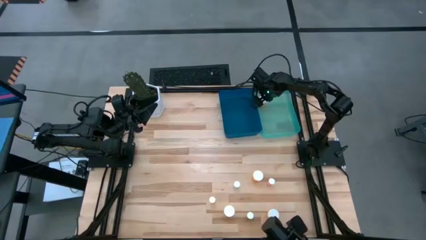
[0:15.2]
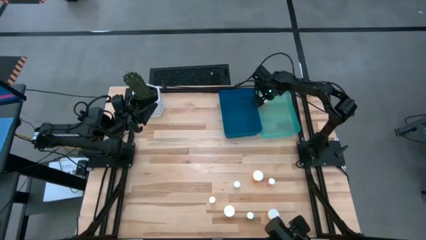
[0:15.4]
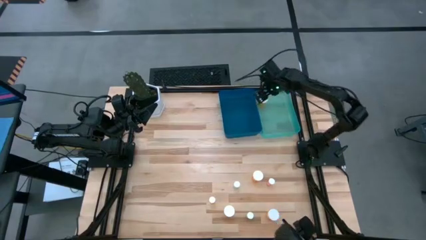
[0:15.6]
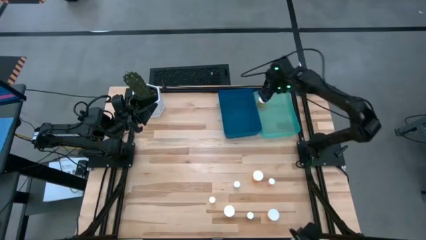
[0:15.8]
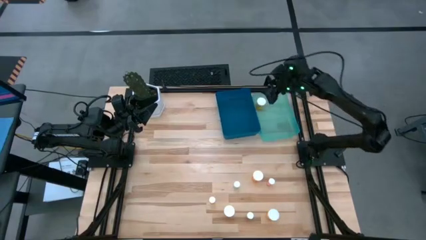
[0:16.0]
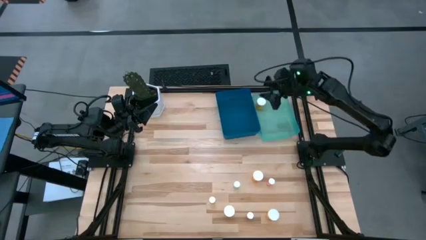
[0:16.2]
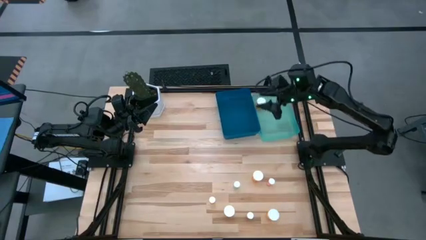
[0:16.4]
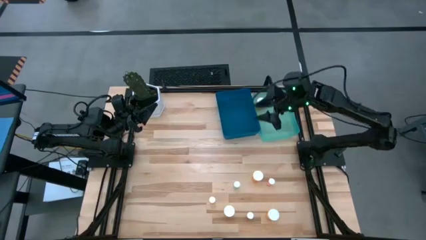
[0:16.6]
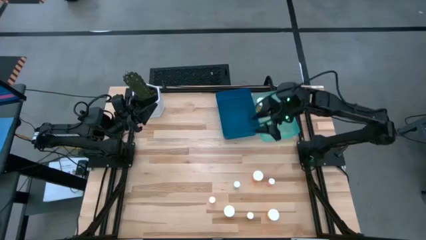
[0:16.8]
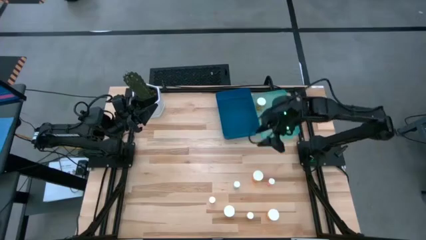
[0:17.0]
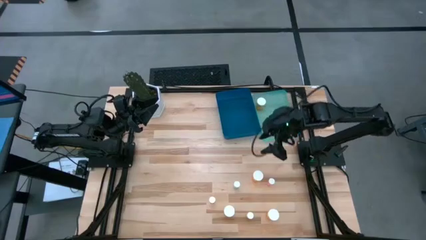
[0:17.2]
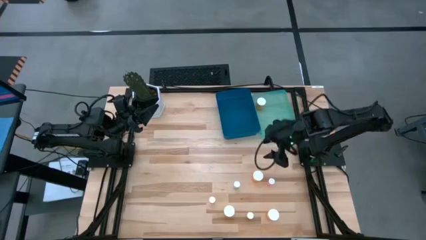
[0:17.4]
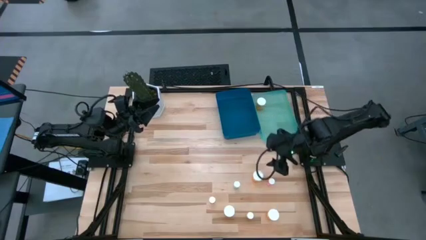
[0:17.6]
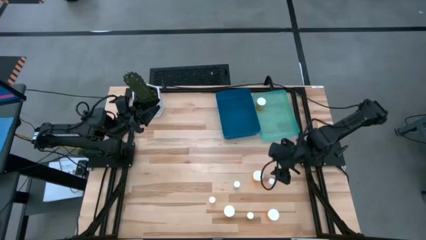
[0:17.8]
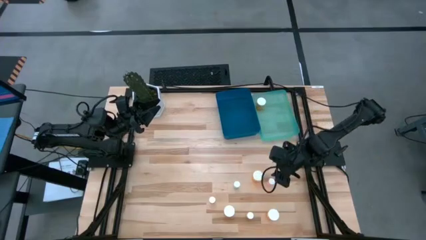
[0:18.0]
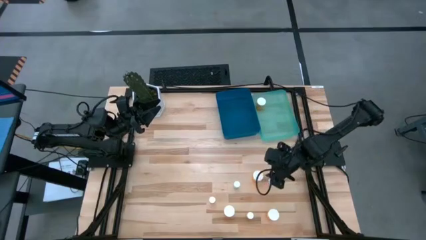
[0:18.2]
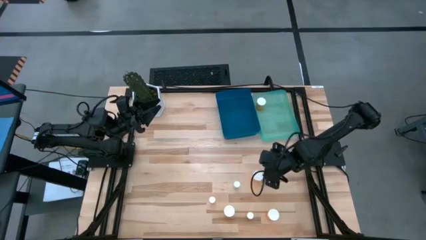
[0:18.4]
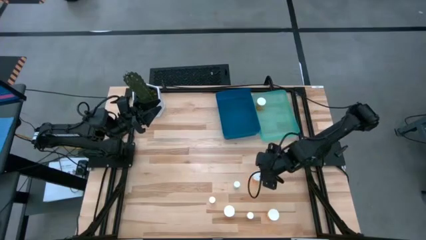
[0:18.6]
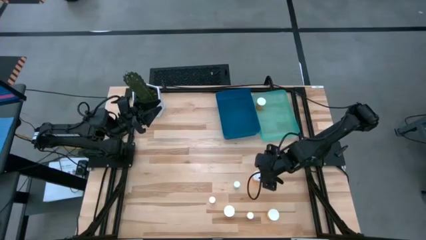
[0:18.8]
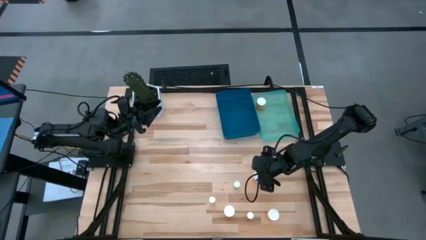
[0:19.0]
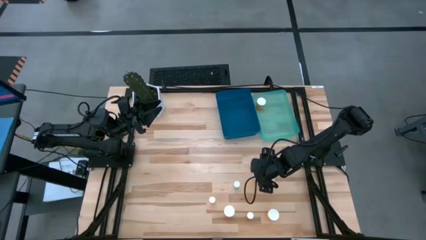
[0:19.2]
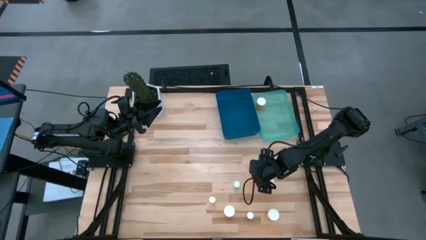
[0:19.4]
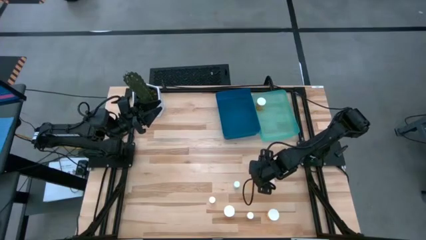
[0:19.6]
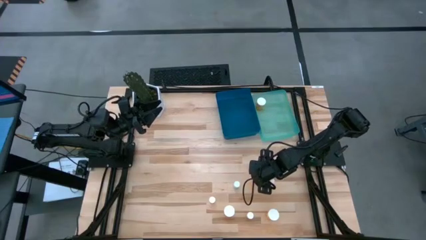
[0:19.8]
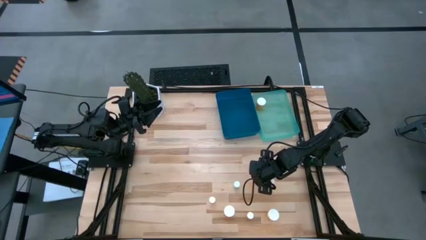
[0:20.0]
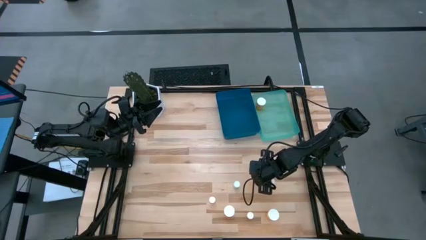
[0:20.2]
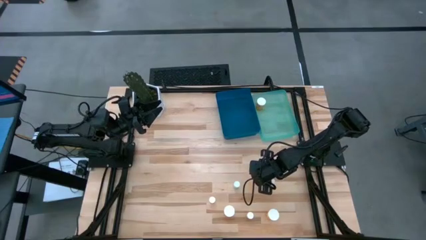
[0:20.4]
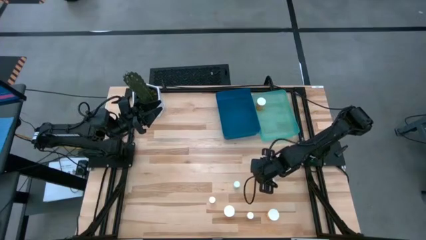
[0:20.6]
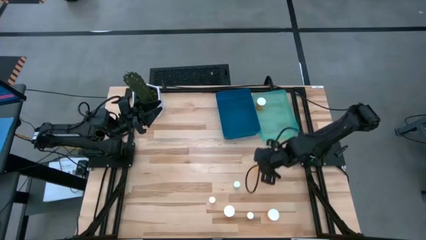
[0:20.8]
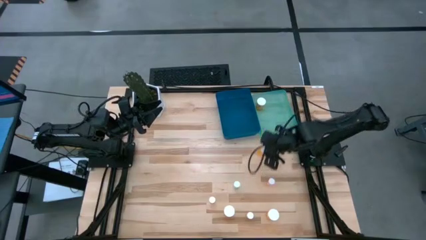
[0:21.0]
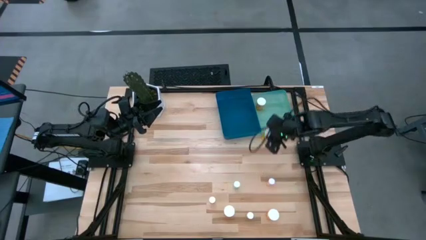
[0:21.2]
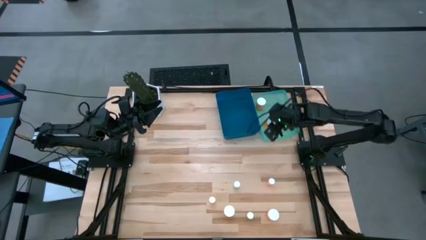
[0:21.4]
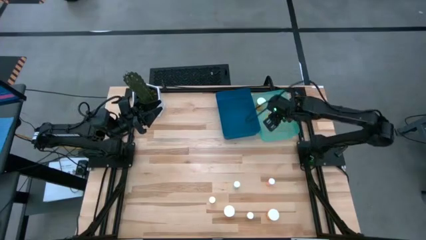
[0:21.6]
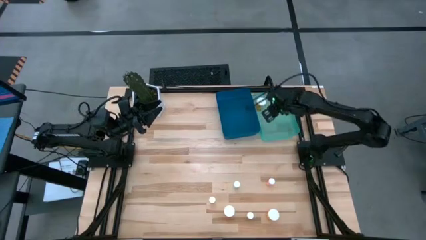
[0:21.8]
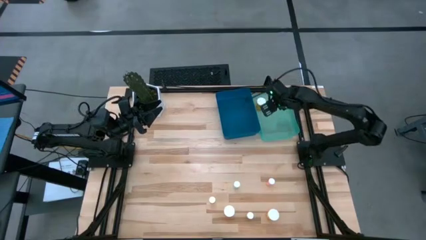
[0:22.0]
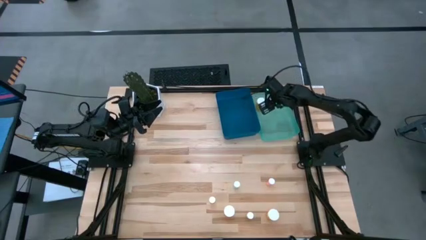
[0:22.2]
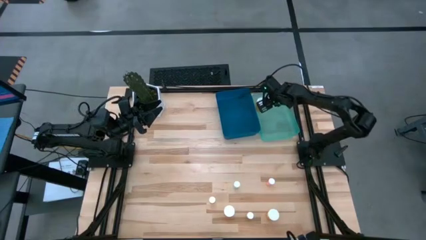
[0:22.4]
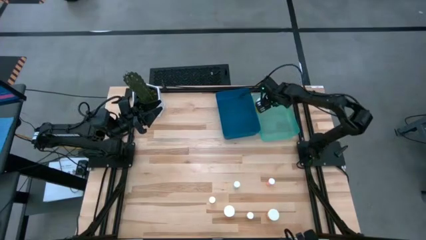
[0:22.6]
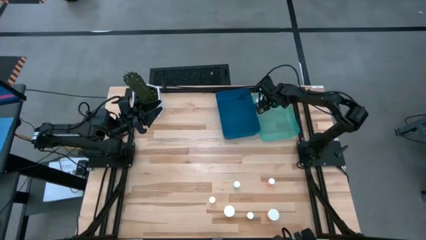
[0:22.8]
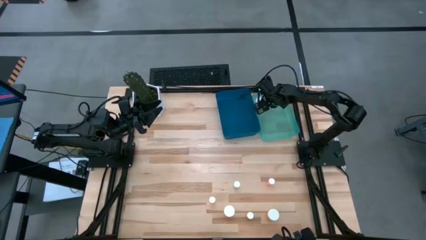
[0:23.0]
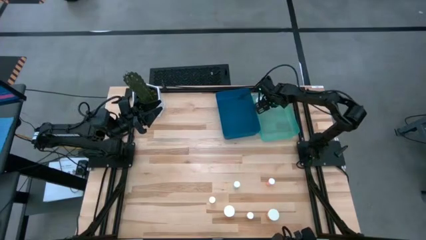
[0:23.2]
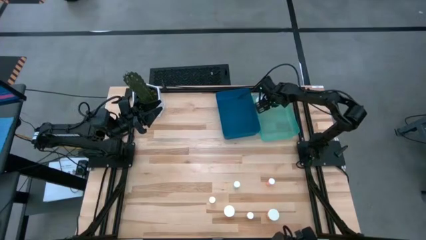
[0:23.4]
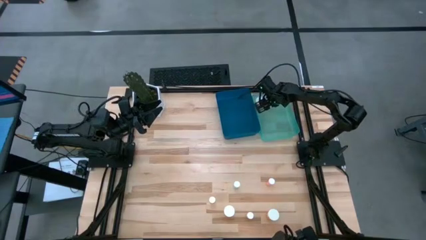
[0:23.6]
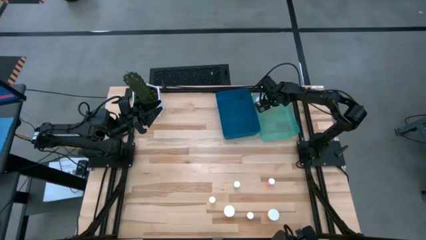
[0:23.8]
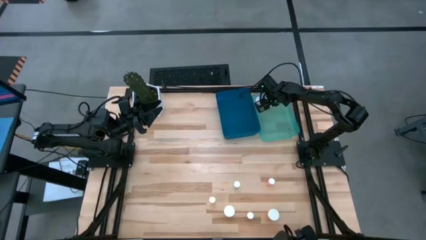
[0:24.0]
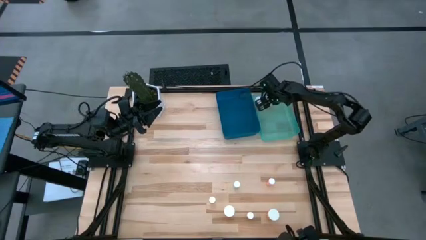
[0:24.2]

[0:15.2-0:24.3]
Task: Pick and place medicine bottles into bin by pill shape (circle, oval)
Put the orange capsule bottle into the light blue bin

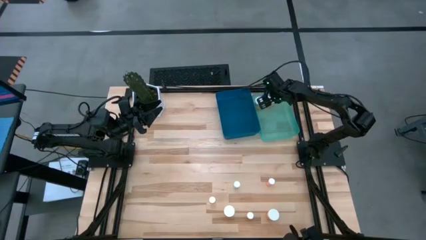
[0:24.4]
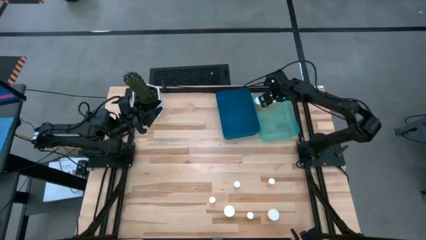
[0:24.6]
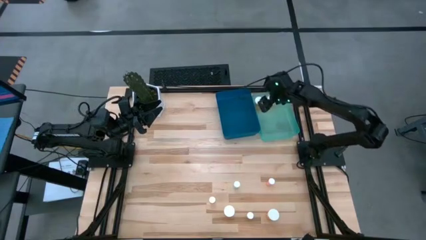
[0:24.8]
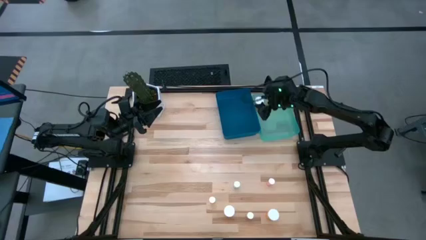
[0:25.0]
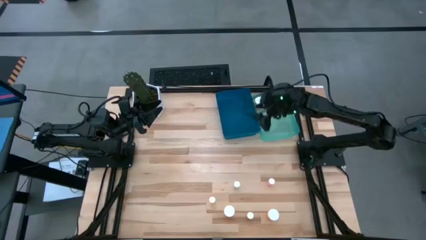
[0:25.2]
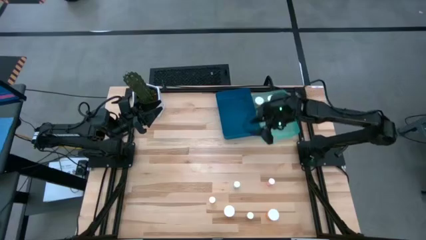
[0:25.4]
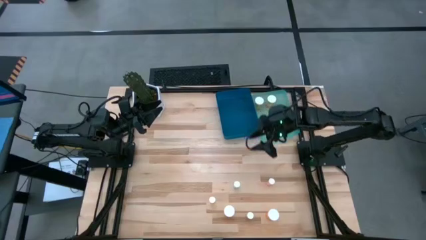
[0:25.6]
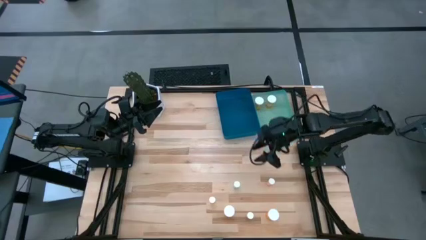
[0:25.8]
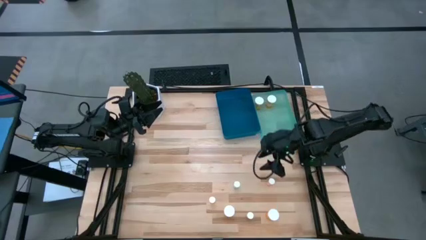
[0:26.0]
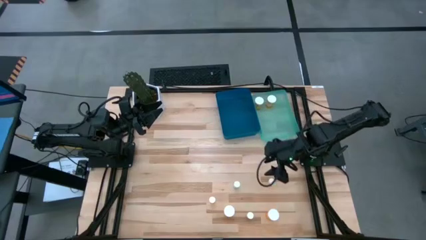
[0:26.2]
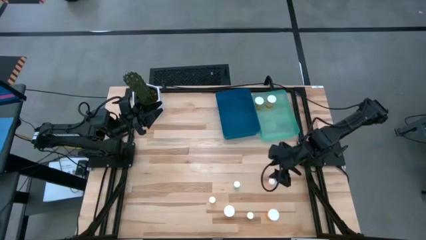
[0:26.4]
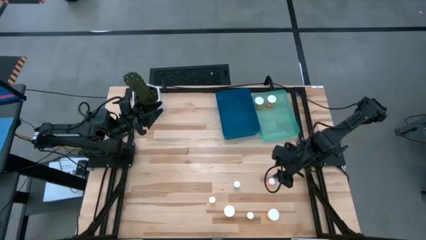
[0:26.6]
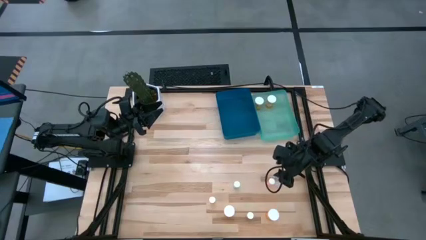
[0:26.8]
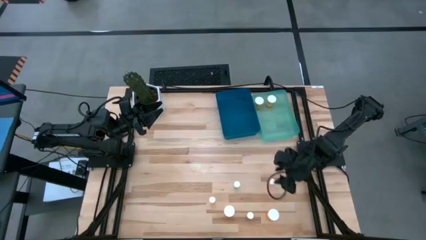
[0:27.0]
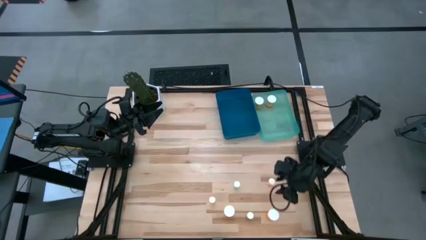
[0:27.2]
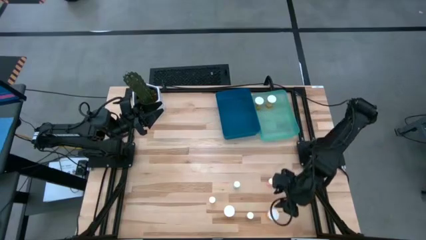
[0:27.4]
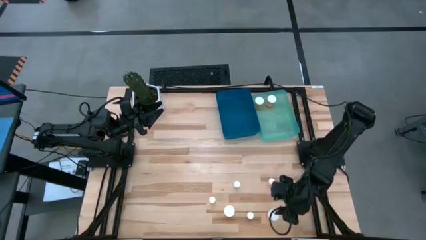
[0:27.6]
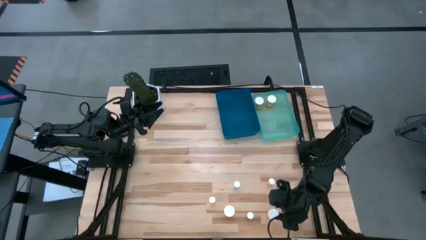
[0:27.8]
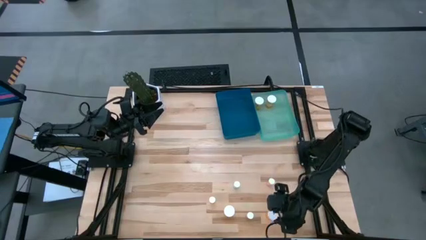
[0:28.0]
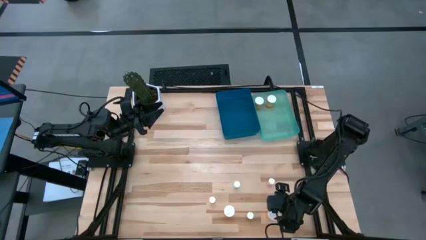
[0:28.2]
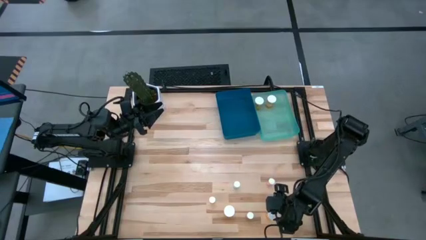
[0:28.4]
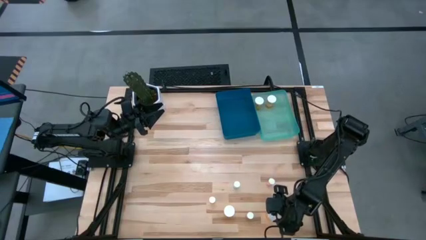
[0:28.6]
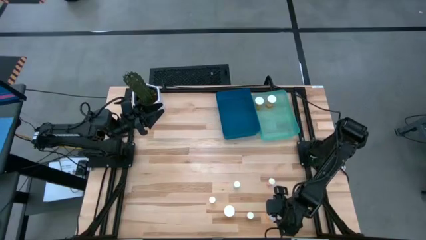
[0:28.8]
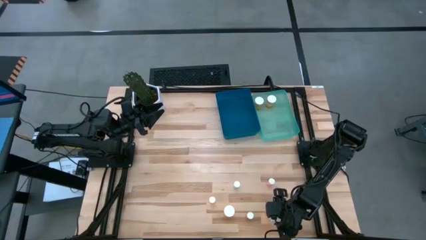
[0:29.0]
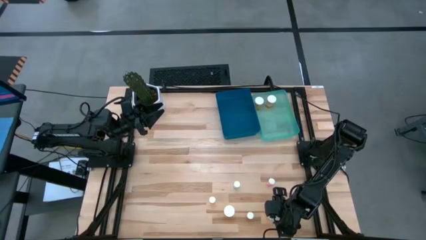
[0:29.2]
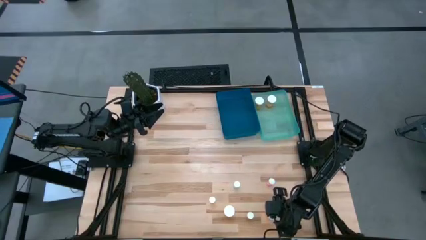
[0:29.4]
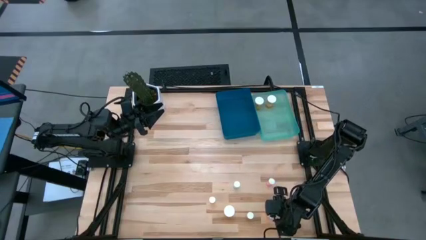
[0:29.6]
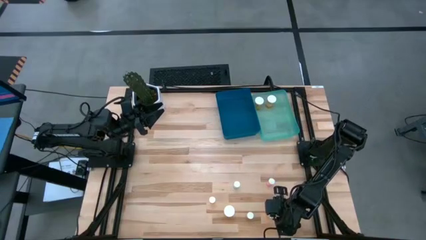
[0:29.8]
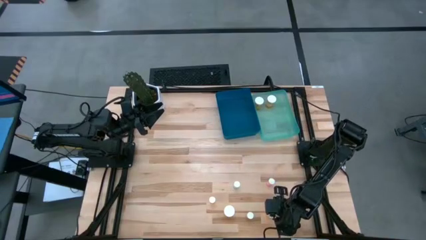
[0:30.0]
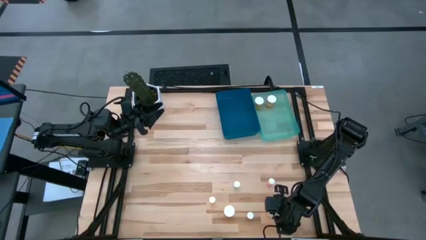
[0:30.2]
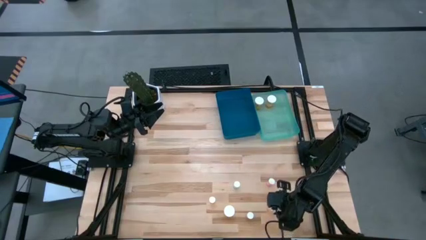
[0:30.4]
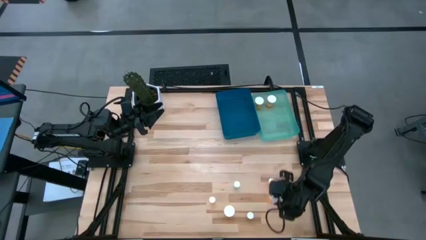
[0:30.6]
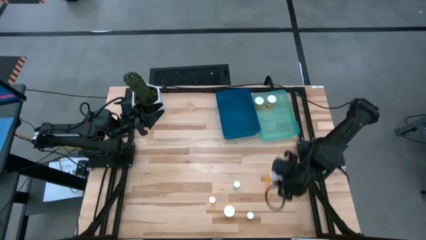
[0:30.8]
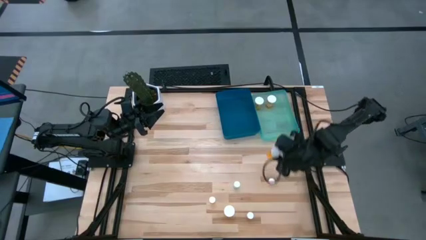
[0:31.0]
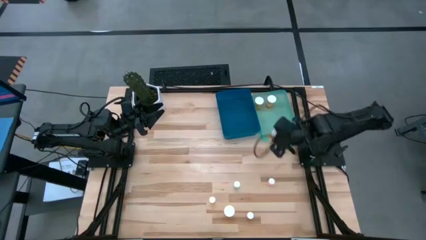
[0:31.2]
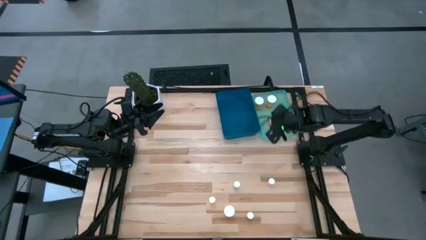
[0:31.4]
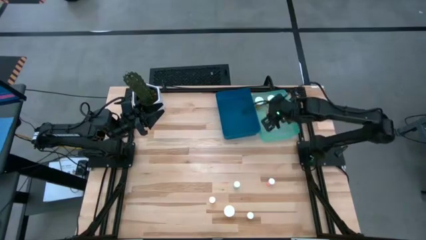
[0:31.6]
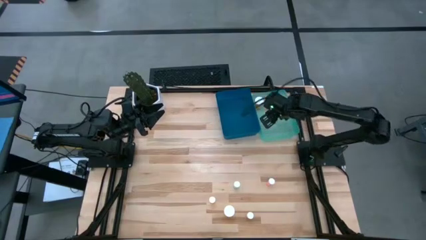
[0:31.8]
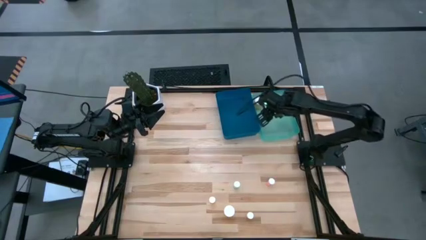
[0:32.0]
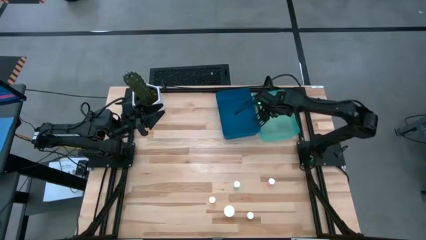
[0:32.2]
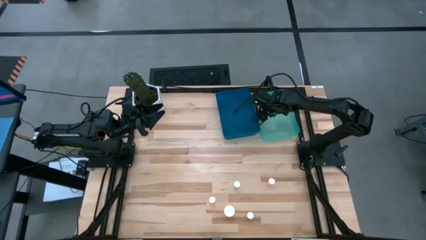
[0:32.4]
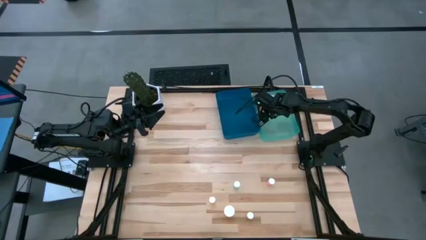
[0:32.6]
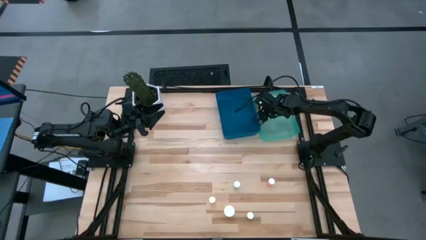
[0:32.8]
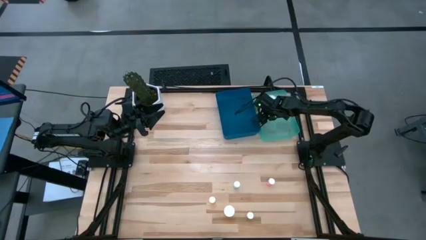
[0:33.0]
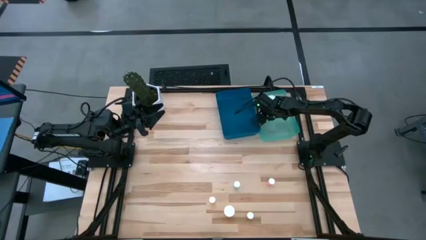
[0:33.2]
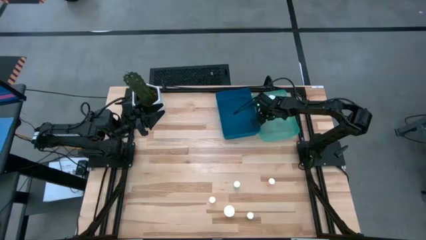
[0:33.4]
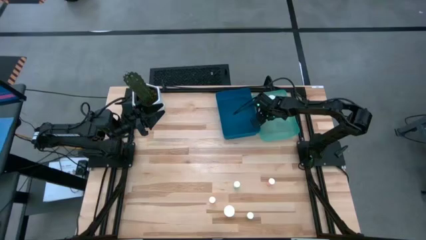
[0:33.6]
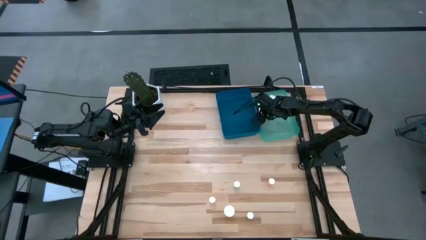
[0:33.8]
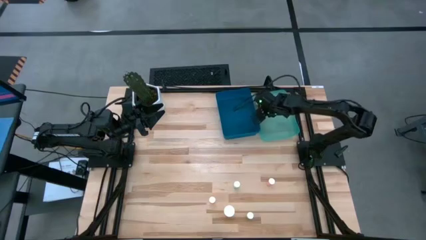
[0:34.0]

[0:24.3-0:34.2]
Put the orange capsule bottle into the light blue bin
